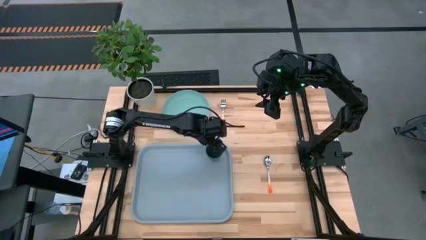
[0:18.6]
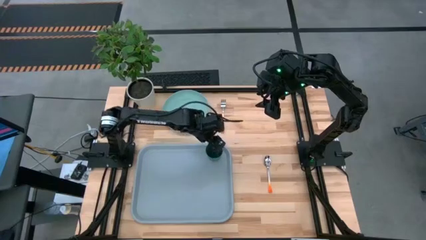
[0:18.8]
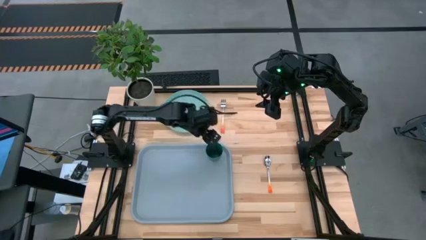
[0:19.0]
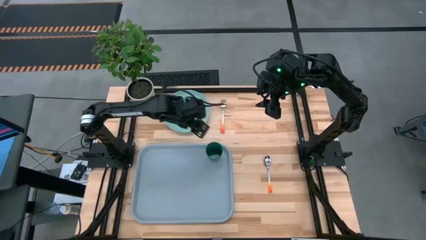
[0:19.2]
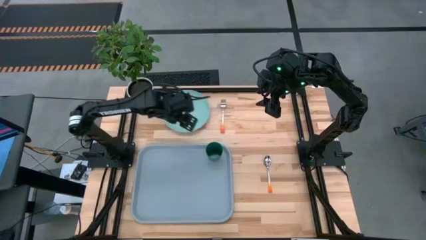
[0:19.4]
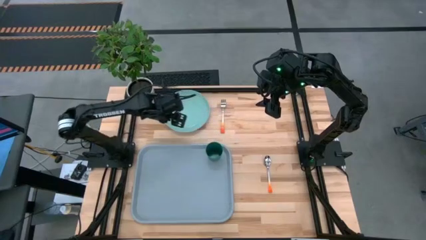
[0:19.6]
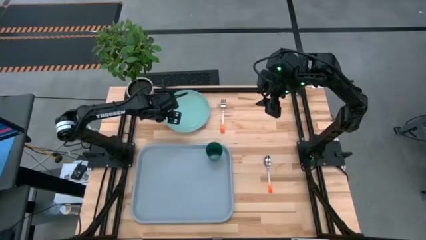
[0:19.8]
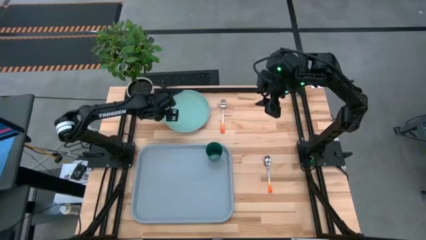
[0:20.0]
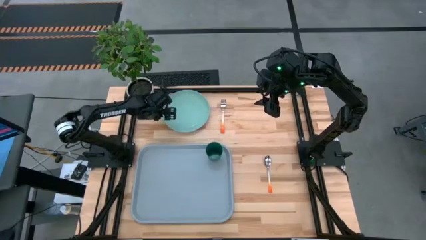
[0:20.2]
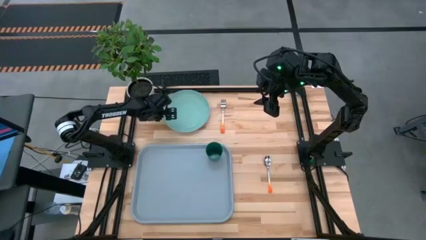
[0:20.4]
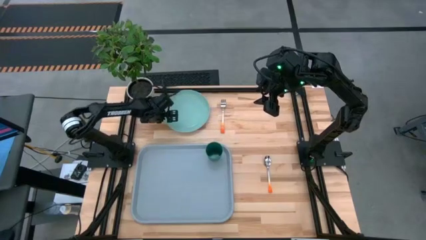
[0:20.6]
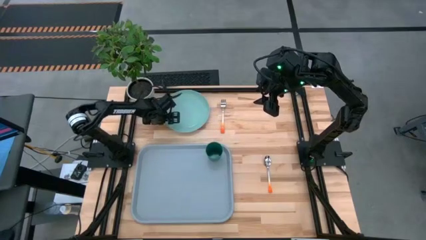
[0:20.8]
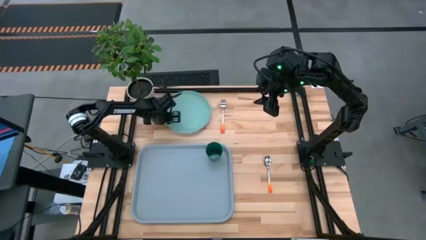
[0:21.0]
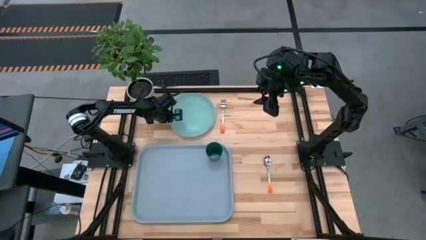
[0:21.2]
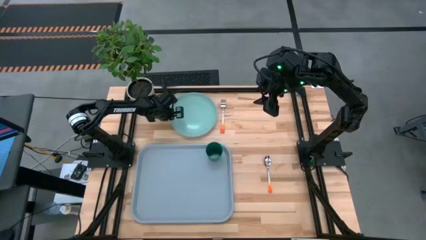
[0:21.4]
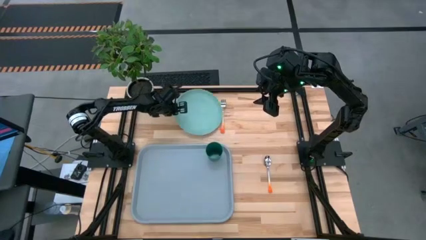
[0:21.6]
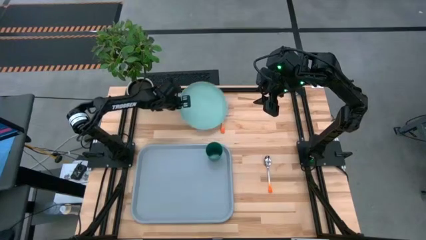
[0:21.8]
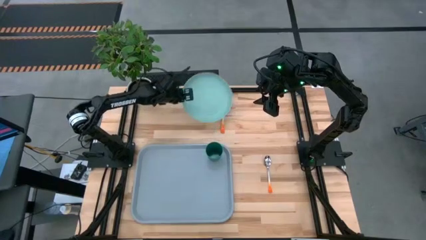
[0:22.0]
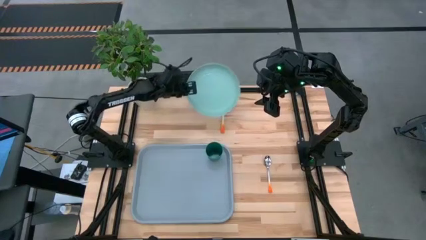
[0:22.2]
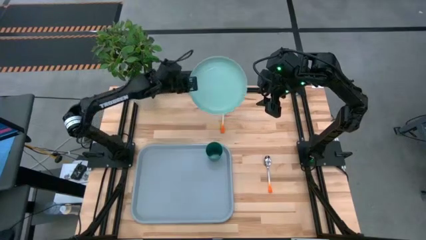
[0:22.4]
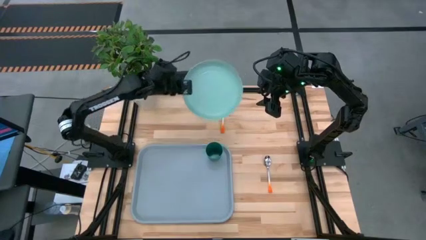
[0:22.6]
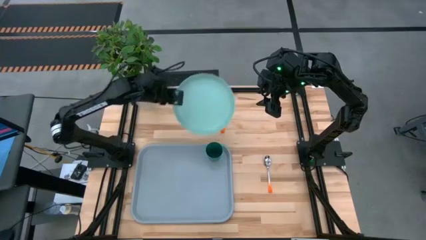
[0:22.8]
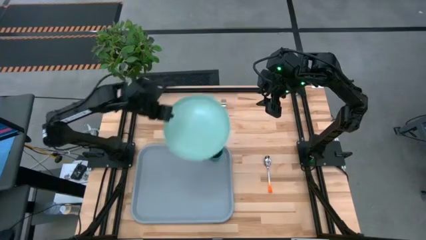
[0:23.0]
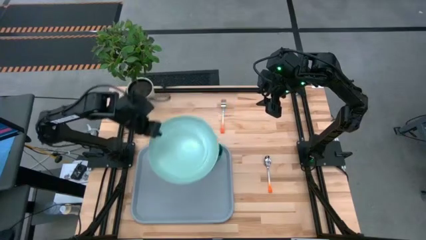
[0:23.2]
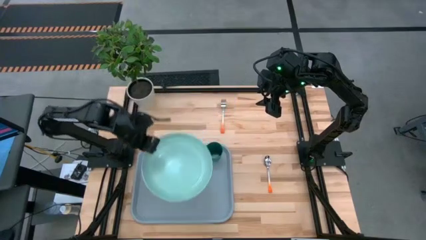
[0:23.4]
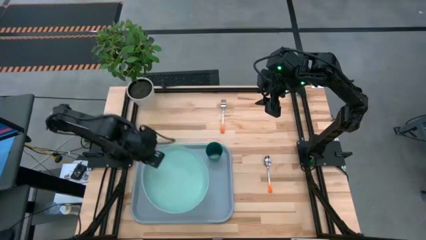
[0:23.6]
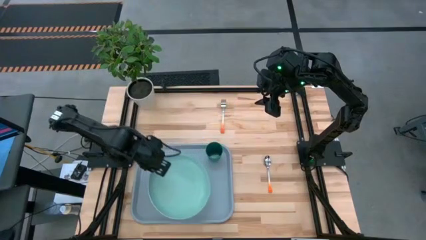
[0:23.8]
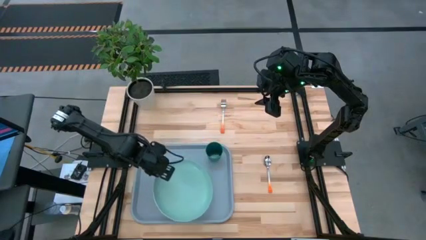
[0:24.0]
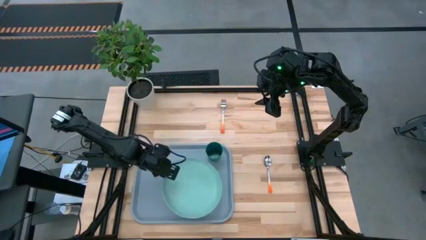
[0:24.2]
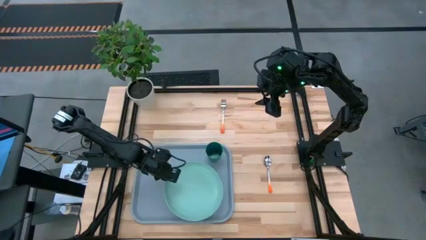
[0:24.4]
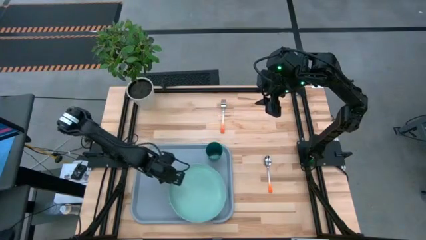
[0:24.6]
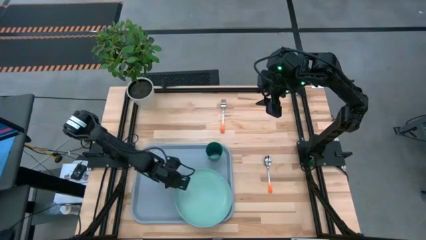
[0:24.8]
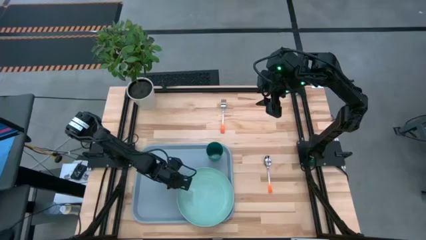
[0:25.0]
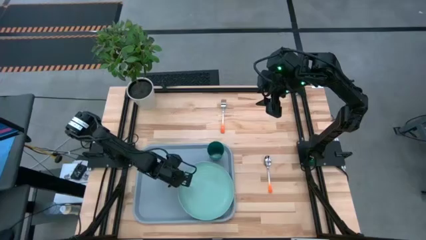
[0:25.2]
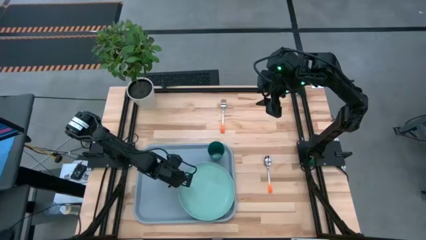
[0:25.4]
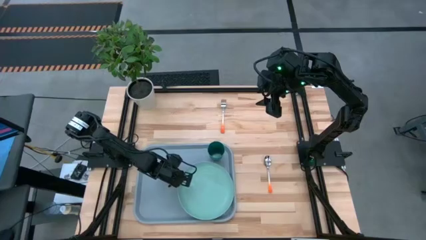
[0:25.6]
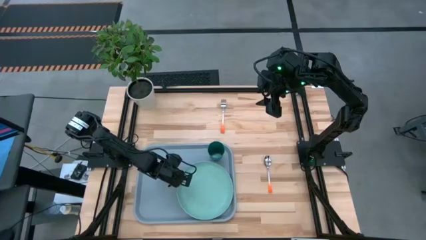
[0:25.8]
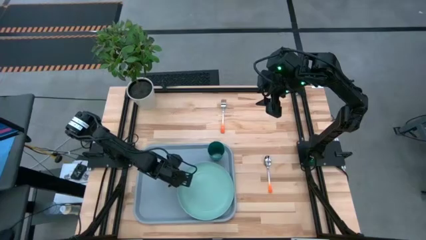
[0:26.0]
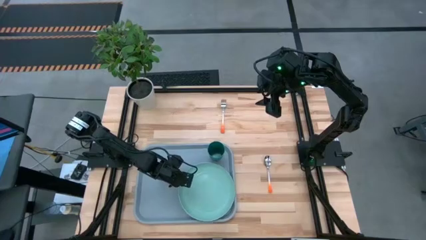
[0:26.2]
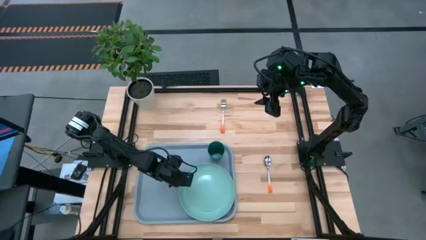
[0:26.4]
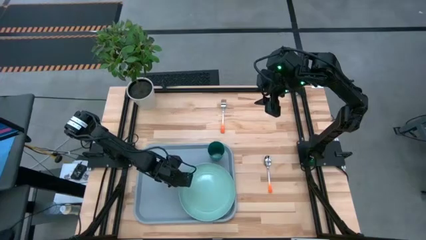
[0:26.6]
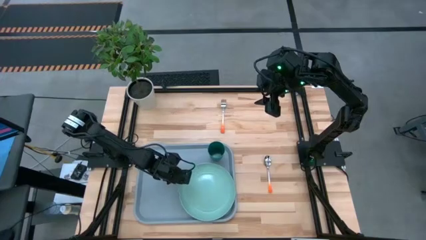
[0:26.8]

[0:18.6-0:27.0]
Task: Pick and place plate/cup/fork/spoon on tray
Put the green plate to the bottom of the green cup on the blue serving tray

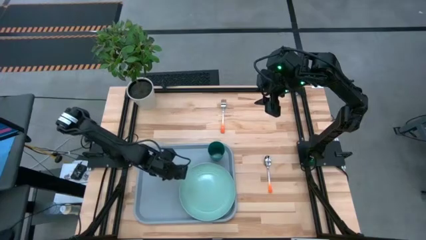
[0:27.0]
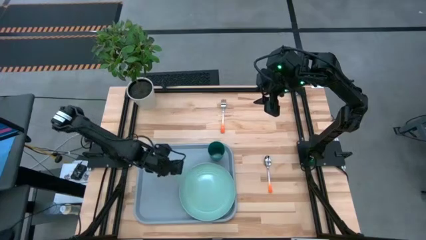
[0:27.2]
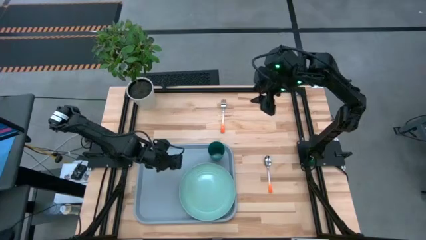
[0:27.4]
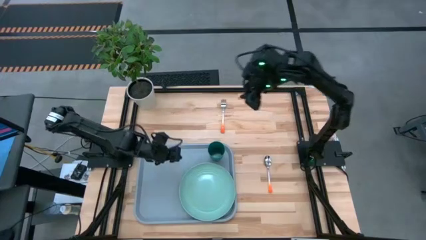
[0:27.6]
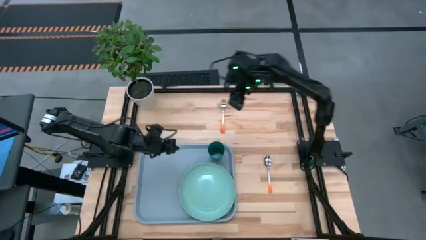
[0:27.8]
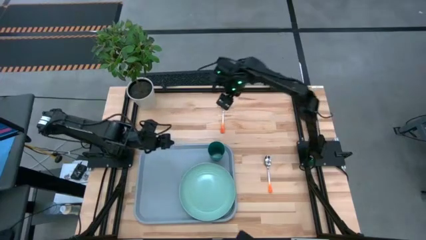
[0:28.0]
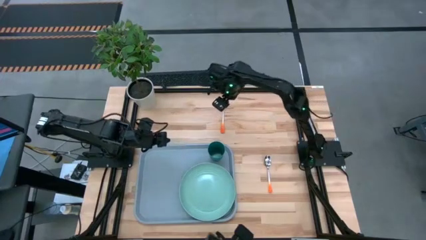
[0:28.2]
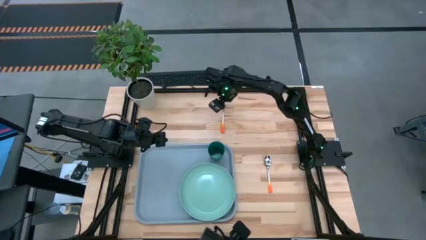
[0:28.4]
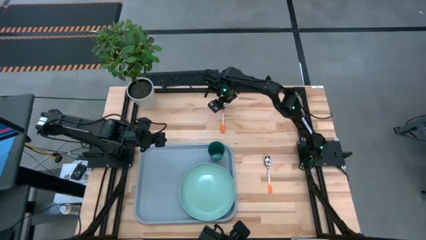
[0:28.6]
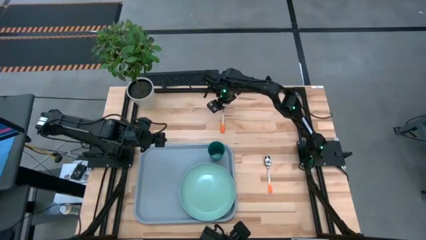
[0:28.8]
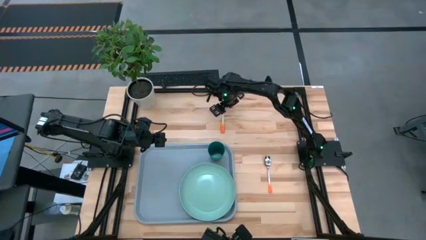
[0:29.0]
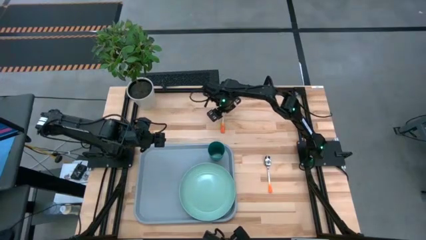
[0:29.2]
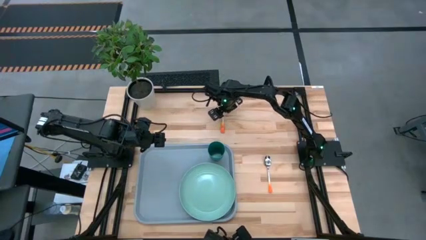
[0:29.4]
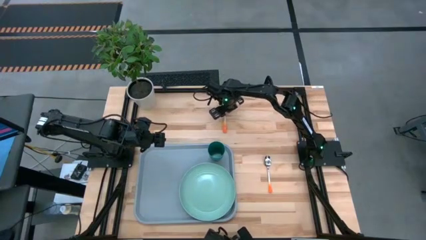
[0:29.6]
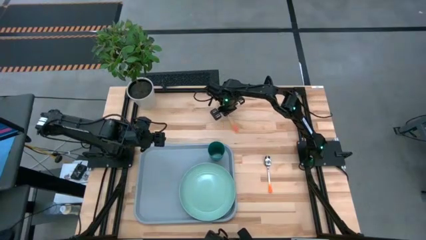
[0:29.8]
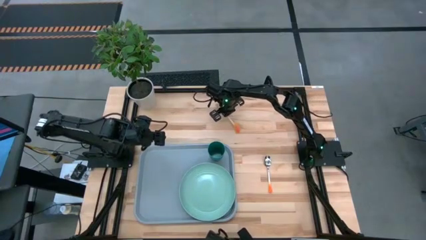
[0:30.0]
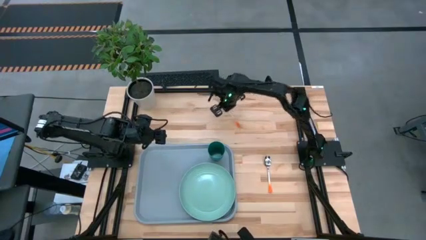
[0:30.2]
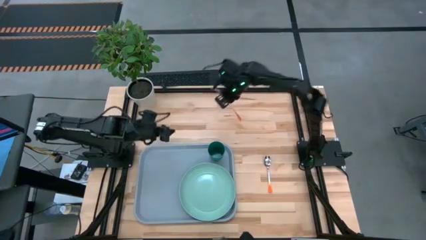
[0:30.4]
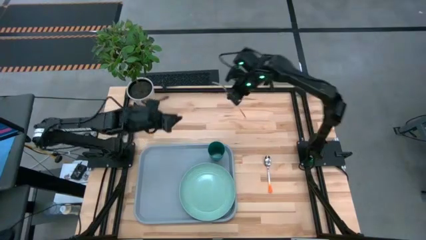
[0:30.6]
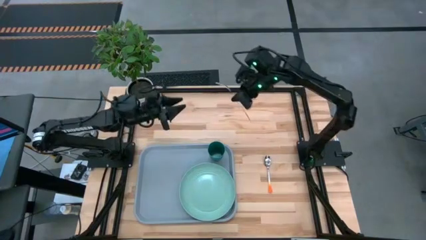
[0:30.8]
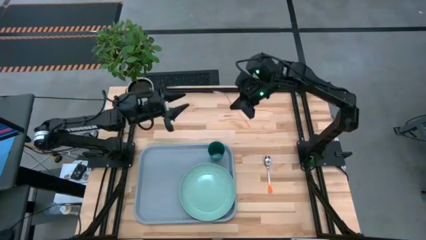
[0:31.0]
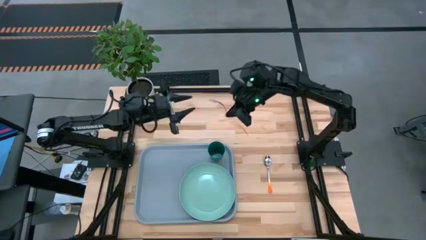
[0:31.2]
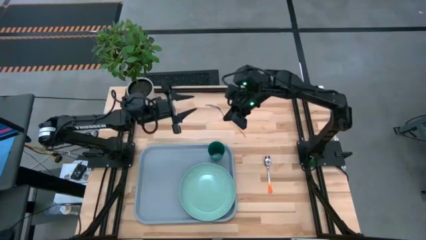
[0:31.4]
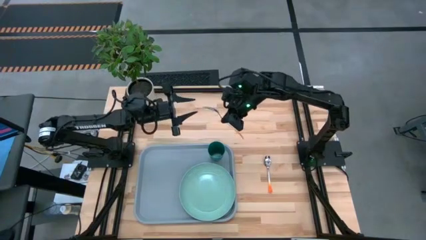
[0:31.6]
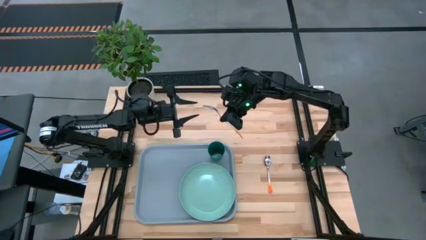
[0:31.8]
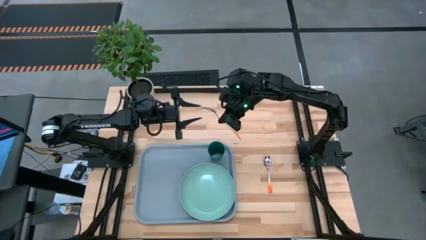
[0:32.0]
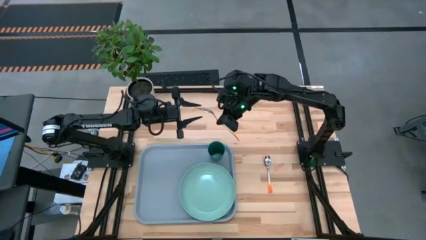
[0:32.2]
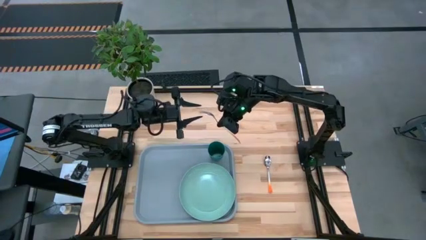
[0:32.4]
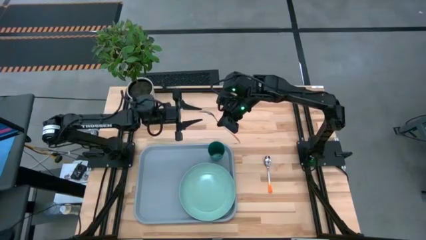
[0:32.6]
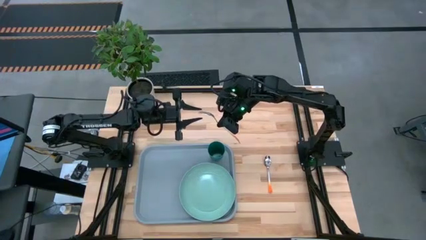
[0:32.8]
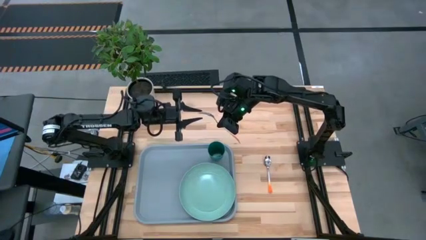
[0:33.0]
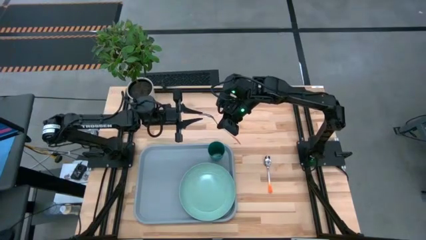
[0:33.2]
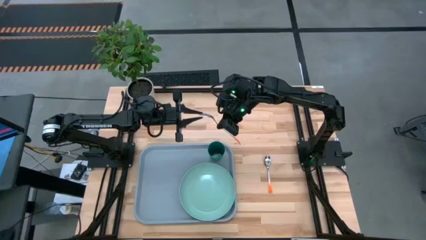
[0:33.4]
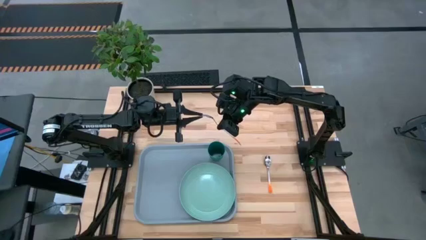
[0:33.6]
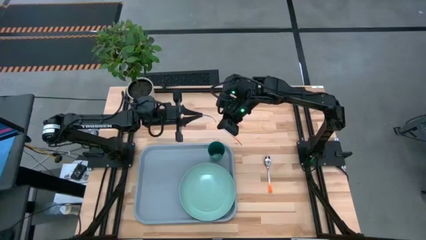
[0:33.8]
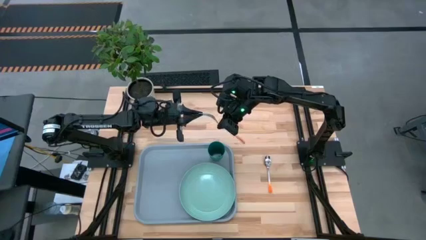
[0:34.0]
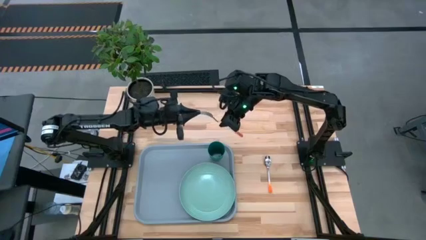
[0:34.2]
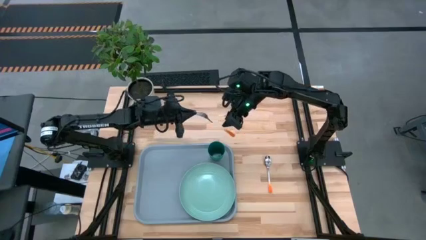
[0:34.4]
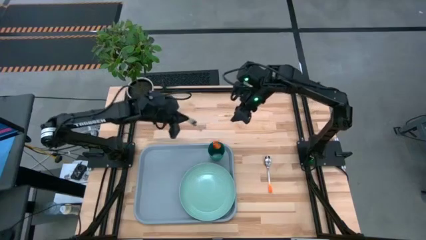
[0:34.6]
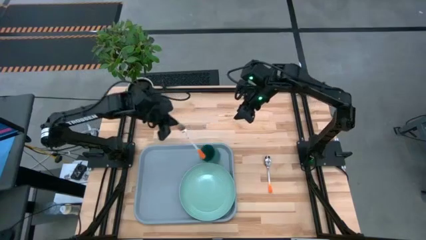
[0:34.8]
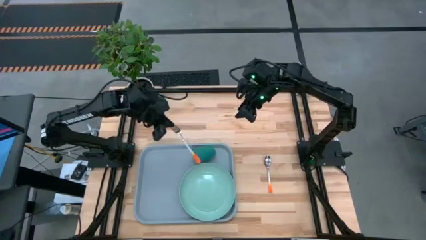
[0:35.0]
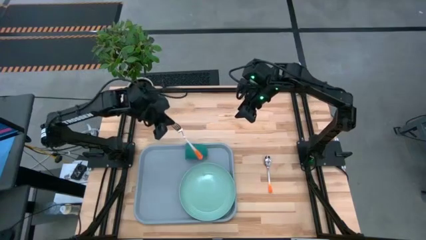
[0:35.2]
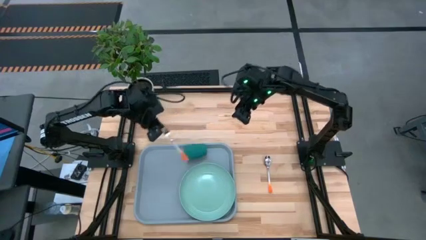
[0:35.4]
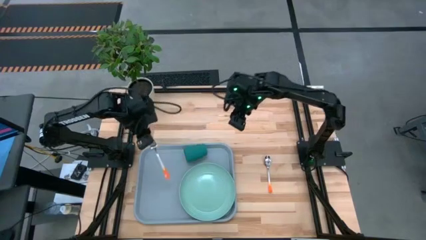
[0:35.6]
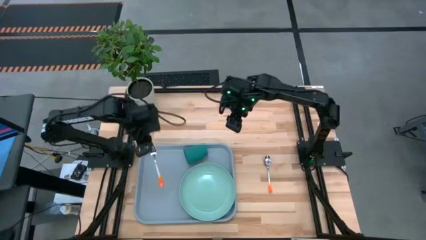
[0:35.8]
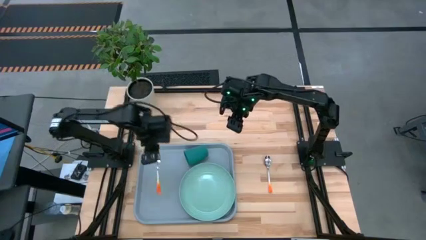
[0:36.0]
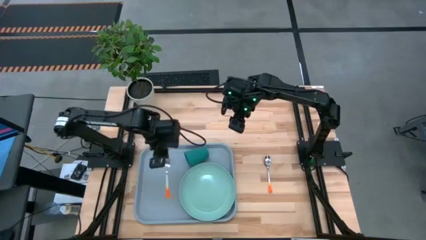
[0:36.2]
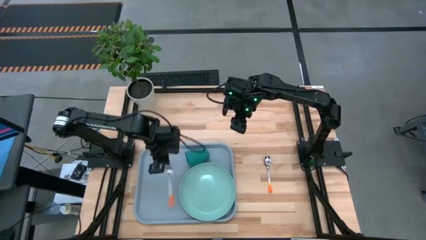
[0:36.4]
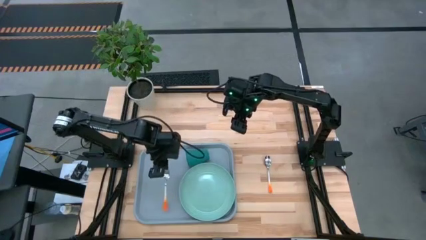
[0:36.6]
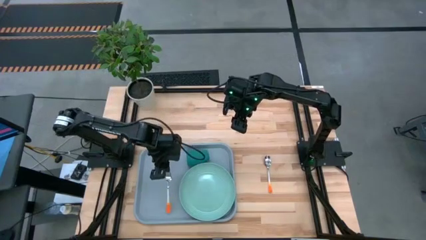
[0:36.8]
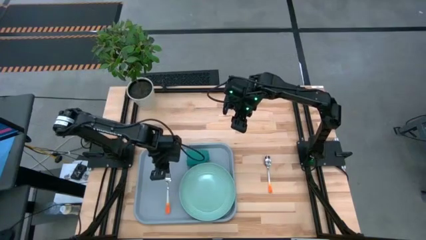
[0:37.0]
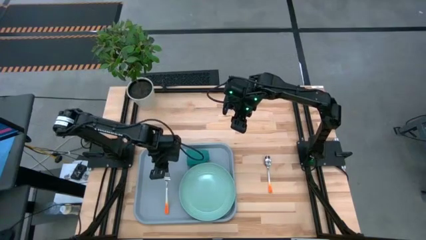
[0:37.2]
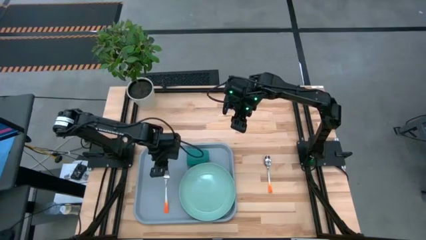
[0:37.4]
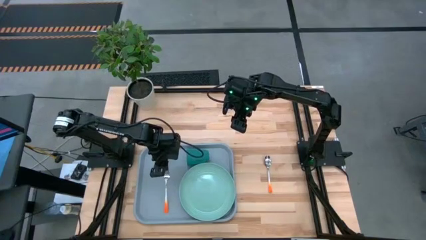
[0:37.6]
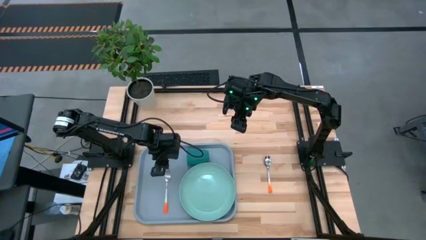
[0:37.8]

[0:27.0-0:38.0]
Put the orange fork to the left side of the green plate on the blue serving tray
